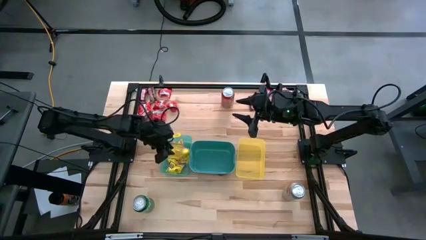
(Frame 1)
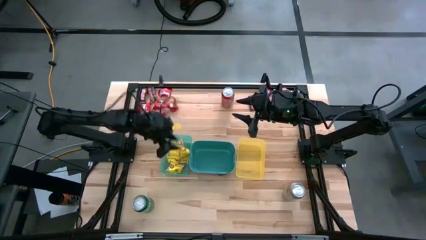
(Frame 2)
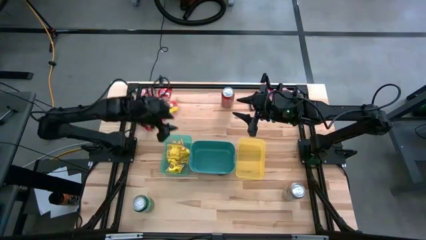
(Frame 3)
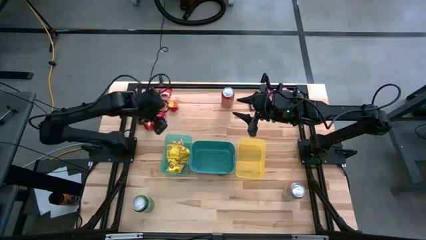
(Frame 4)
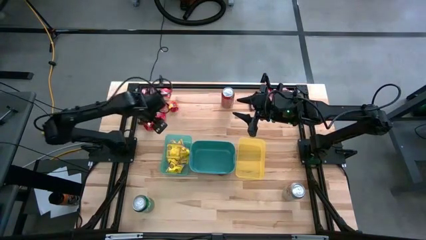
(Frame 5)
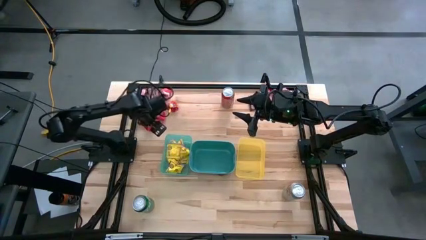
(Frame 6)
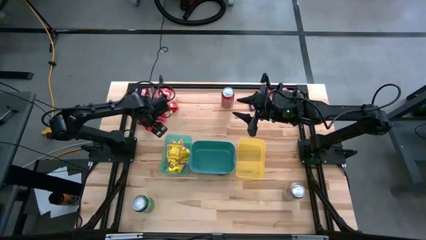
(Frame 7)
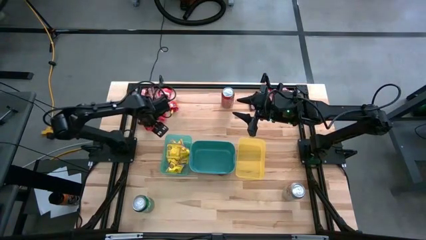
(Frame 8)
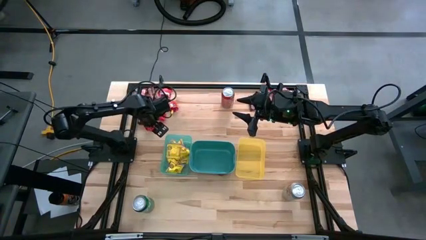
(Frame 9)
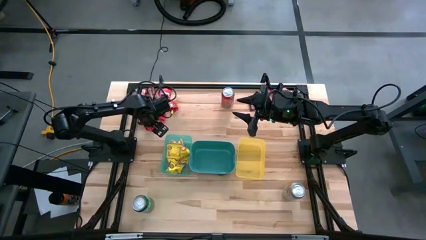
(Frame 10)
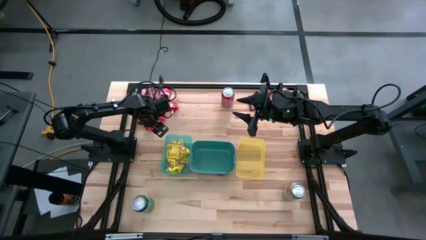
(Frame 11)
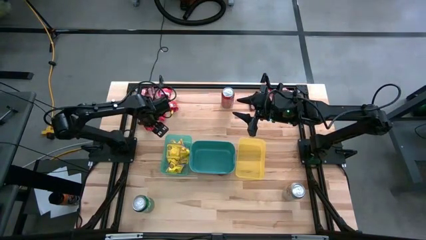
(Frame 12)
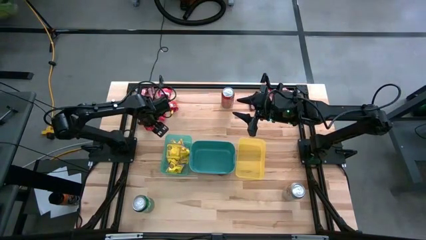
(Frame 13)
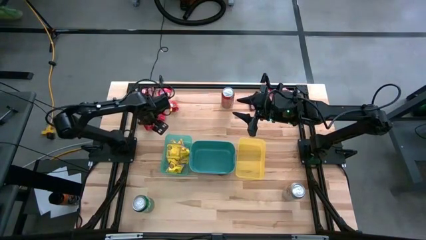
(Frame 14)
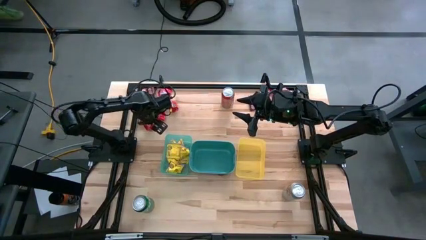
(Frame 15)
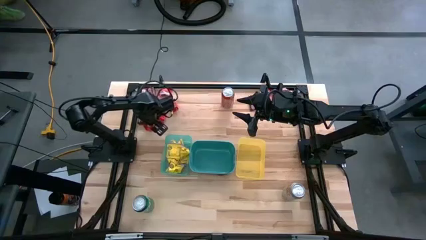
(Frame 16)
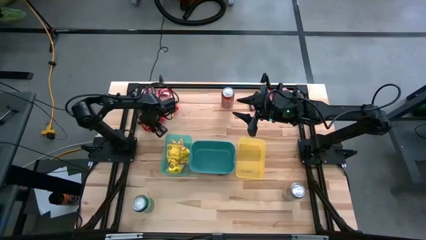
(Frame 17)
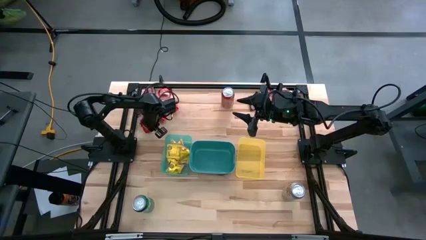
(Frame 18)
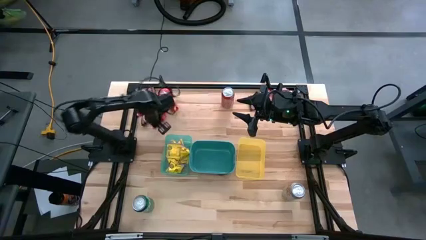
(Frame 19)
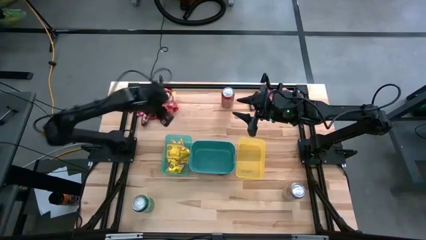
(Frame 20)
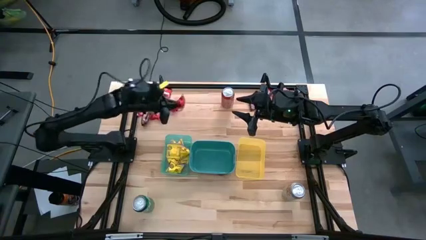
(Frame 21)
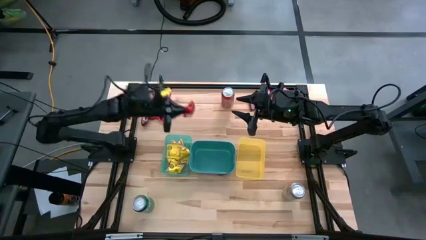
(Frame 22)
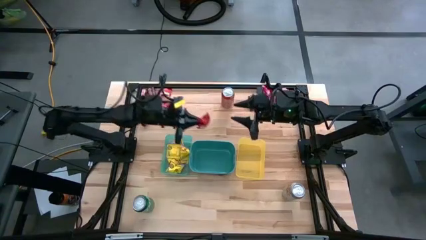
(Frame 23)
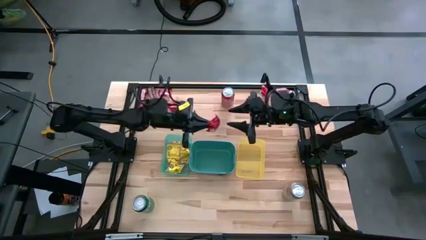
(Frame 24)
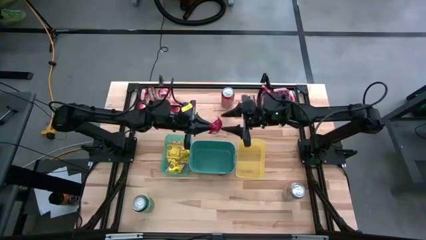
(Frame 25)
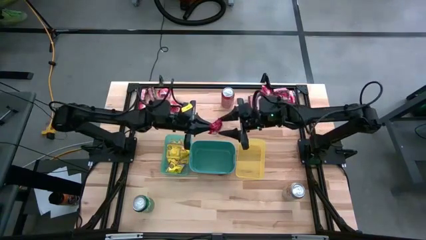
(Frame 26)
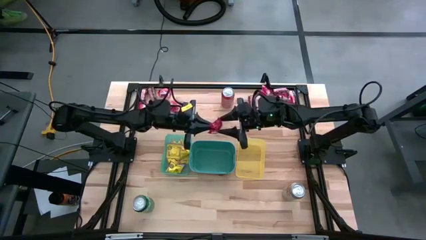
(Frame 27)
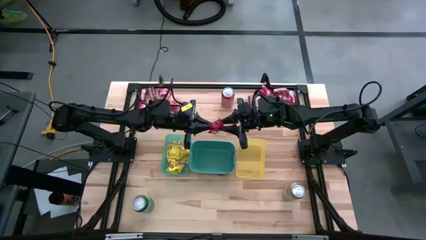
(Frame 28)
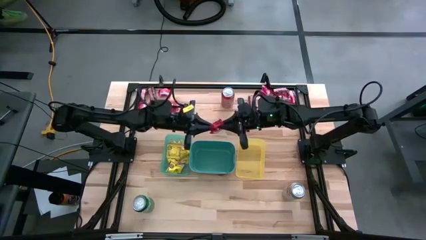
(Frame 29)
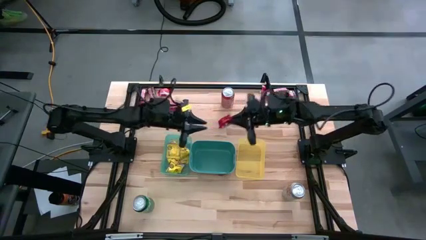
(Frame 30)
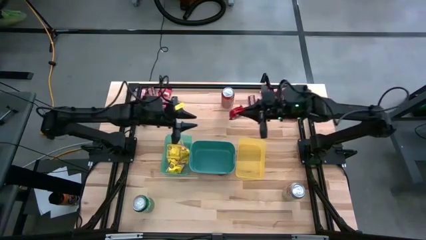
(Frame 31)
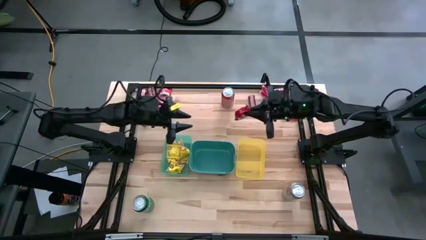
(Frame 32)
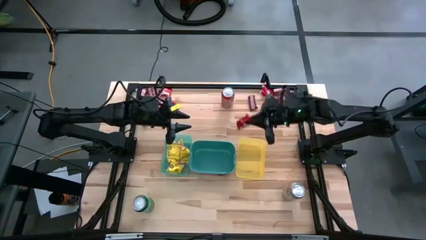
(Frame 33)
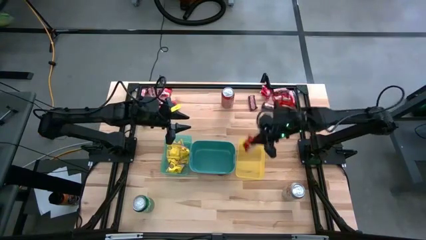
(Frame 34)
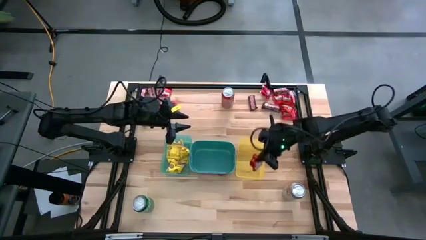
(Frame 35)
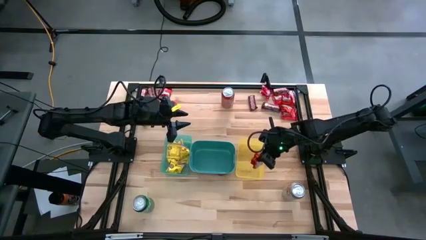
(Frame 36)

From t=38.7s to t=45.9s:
Task: Sort candy
Put the red candy into the yellow bin

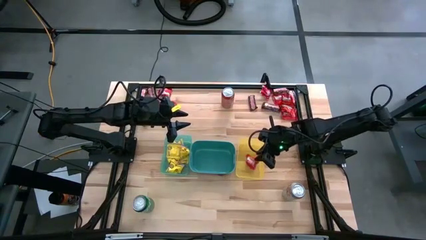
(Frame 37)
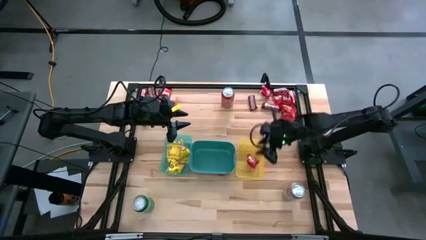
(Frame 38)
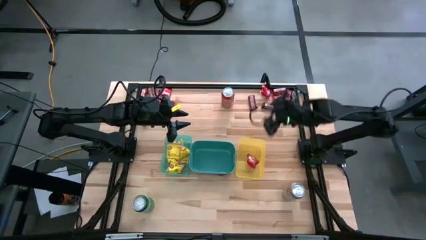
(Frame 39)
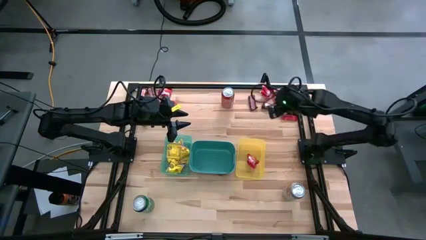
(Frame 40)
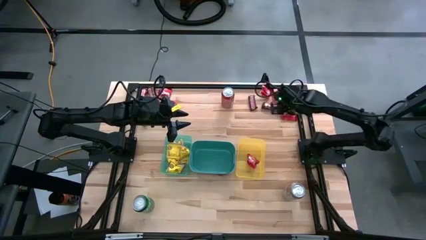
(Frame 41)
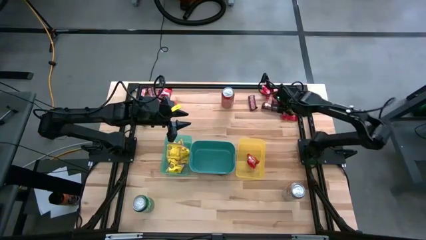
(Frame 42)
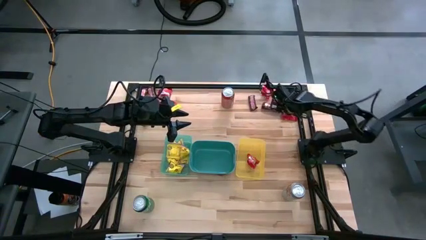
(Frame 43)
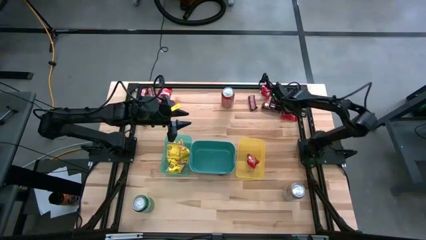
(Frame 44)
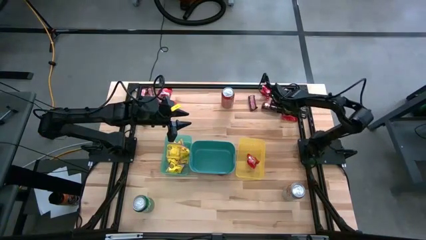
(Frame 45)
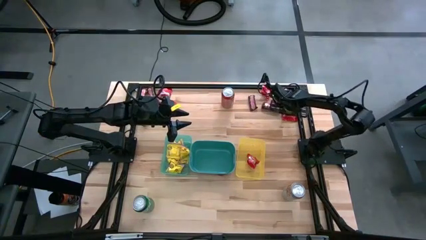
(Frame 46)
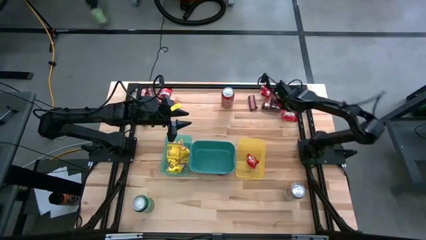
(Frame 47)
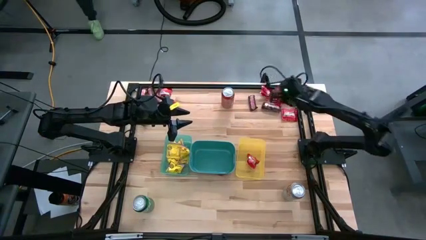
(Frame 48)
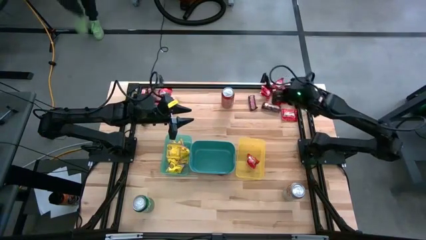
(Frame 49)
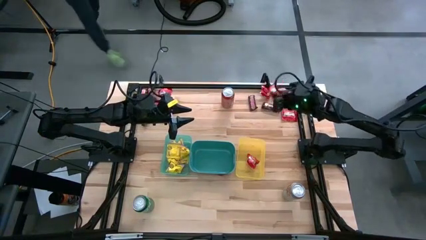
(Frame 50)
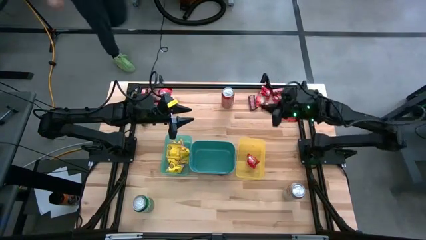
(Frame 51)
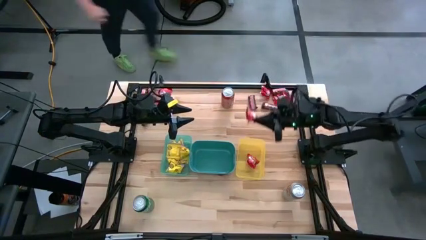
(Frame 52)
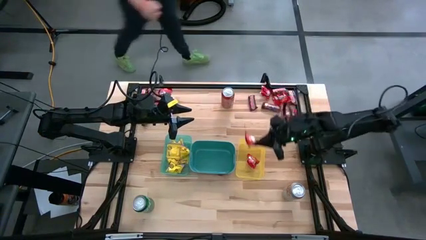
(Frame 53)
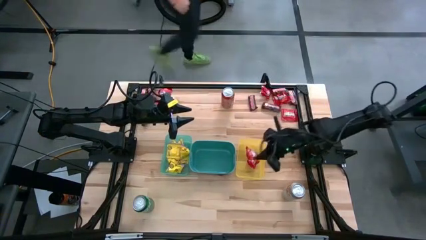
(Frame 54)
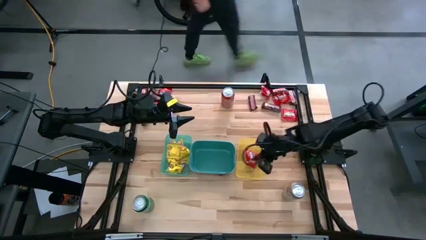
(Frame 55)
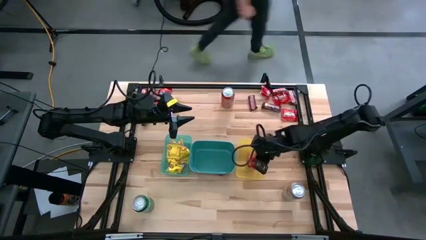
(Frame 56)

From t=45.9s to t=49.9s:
Put the red candy into the yellow bin

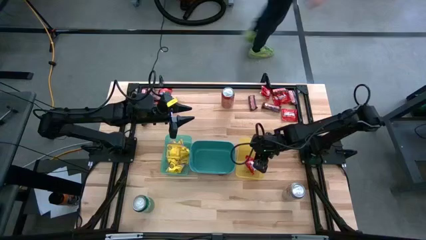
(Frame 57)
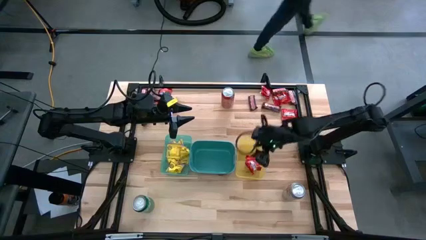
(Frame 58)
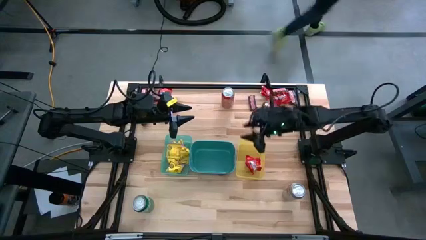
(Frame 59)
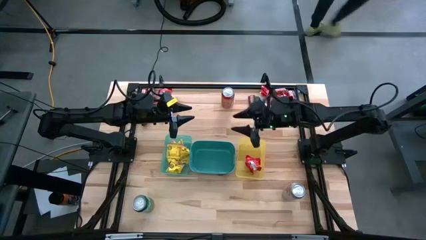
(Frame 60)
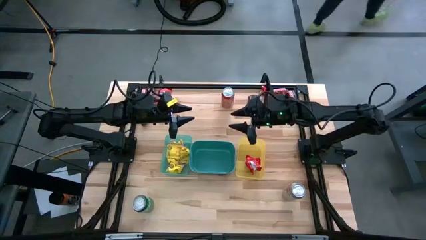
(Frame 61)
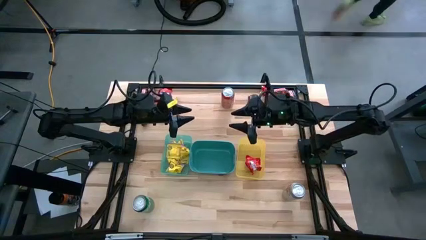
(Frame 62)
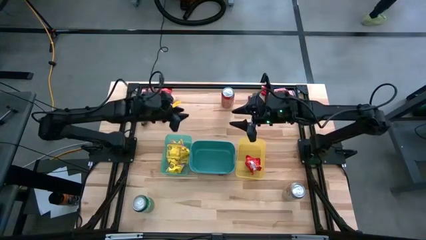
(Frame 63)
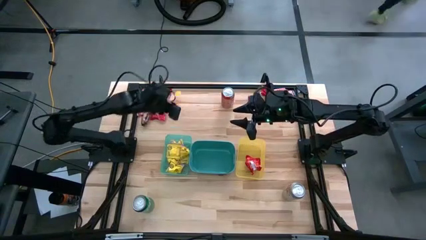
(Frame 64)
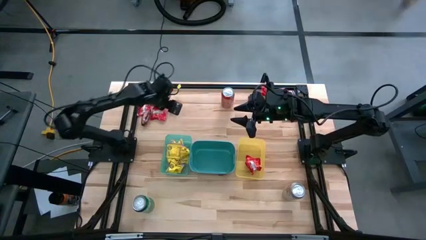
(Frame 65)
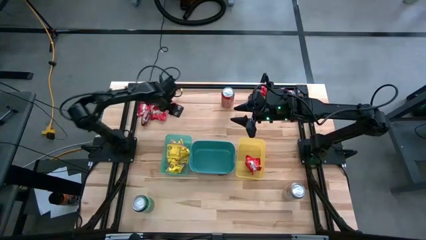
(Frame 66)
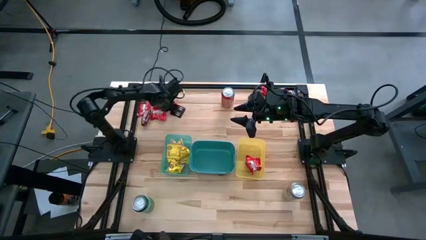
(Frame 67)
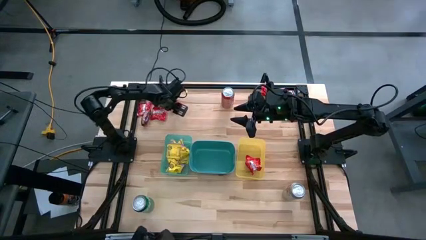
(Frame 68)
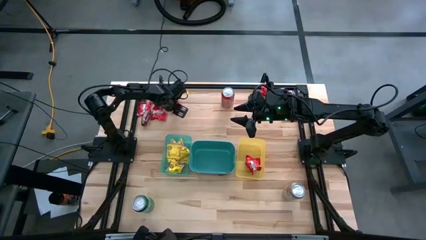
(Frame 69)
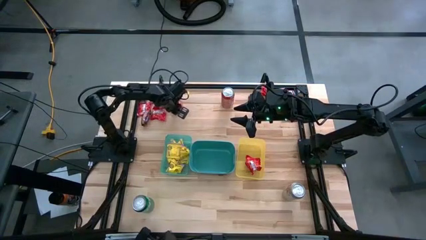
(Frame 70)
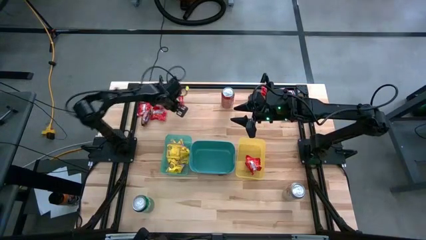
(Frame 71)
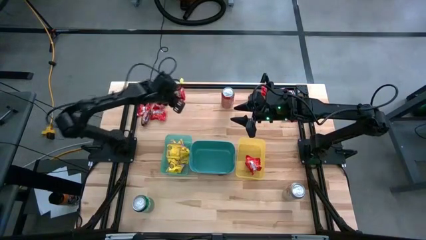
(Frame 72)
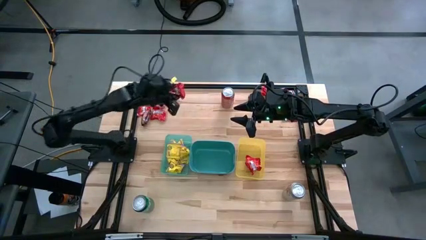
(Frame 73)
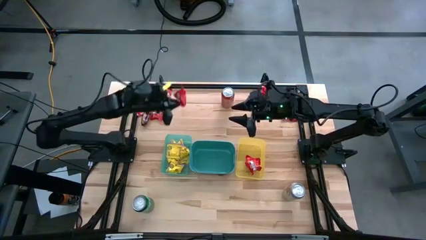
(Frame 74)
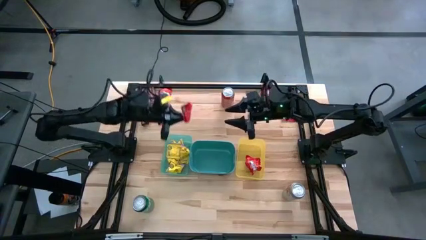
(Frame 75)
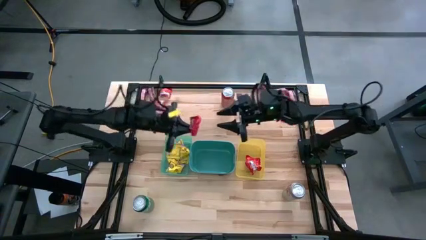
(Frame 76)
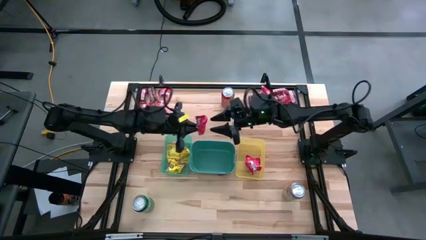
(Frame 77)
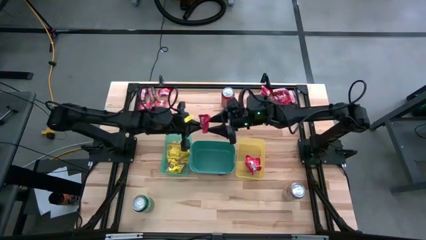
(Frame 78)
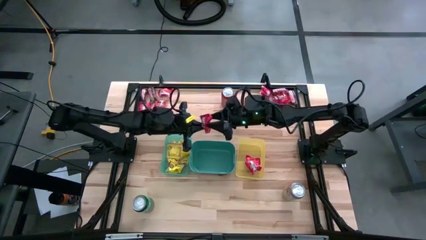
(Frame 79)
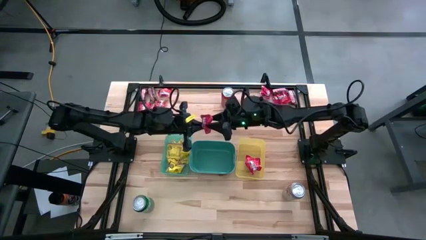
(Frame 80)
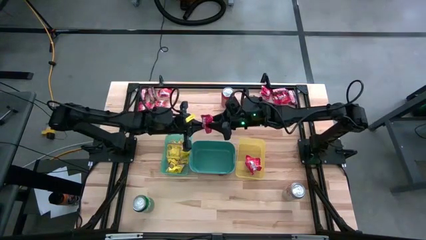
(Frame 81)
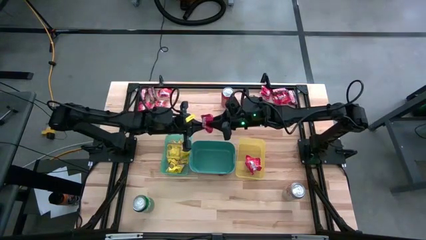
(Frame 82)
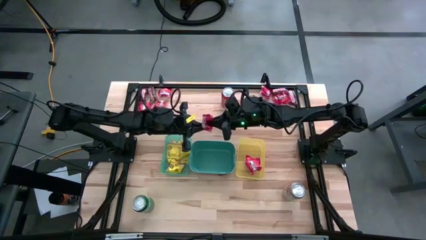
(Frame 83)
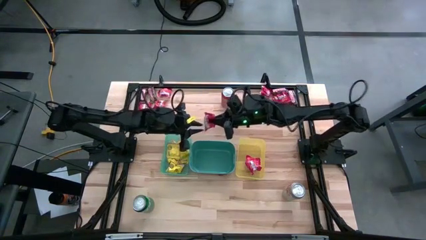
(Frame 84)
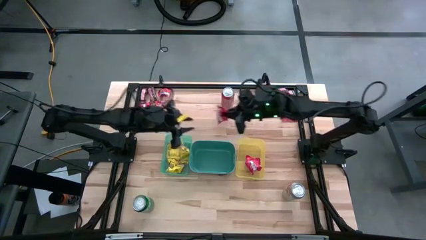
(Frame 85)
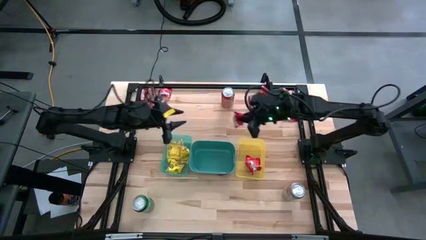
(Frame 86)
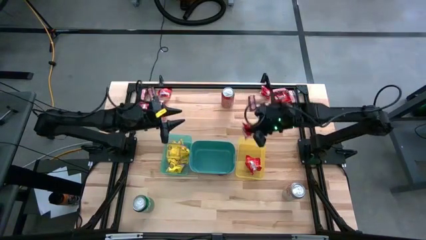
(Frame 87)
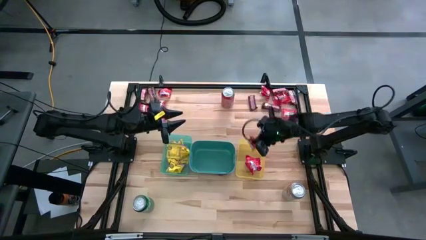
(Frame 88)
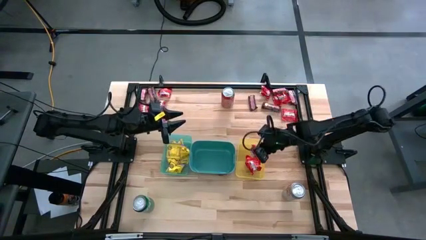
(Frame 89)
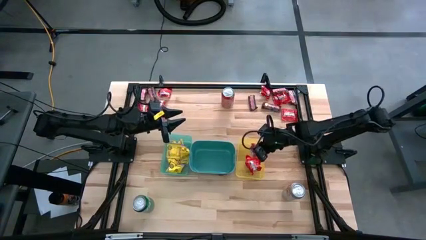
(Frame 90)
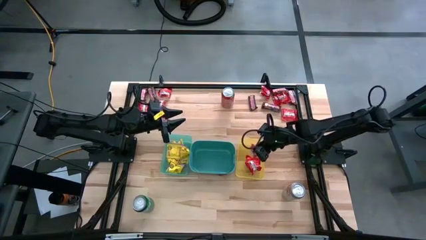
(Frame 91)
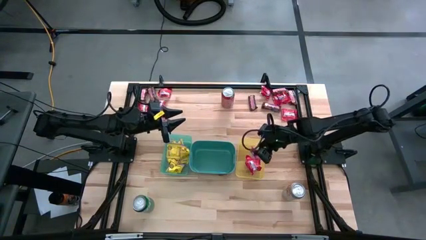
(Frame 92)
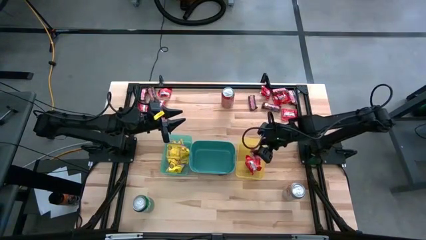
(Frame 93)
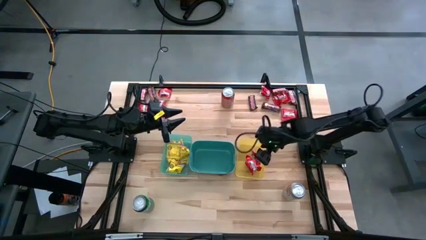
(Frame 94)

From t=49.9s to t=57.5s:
Put the red candy into the yellow bin
